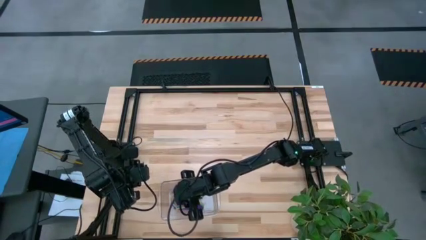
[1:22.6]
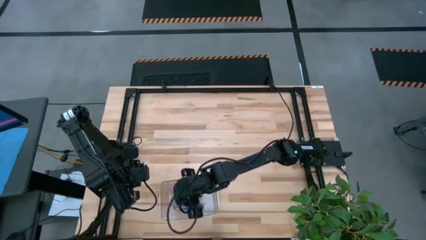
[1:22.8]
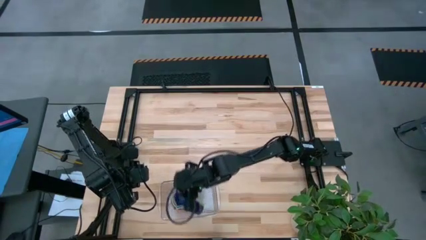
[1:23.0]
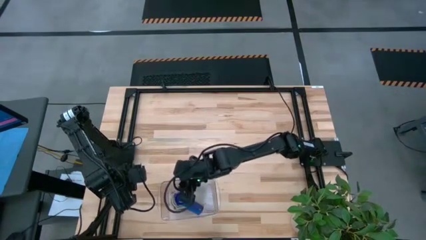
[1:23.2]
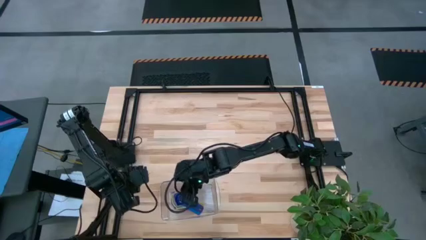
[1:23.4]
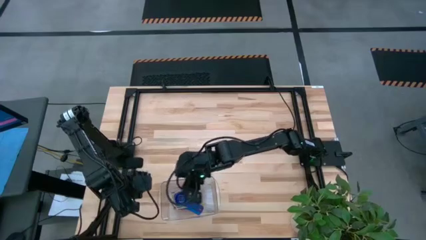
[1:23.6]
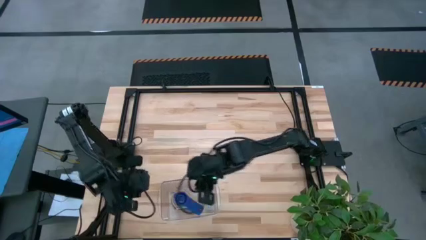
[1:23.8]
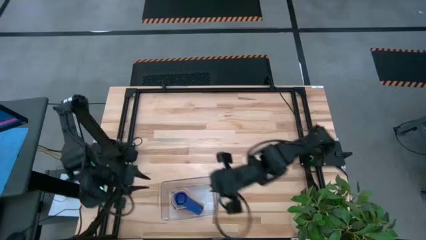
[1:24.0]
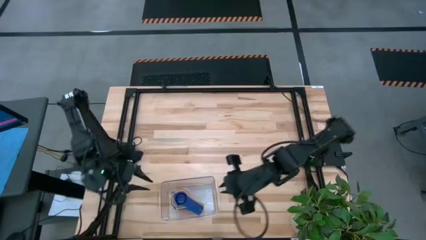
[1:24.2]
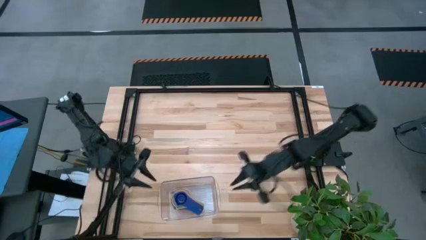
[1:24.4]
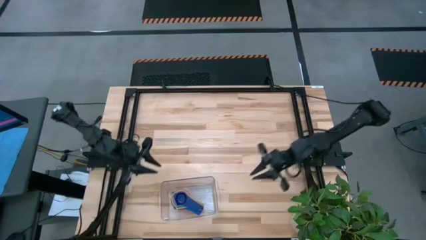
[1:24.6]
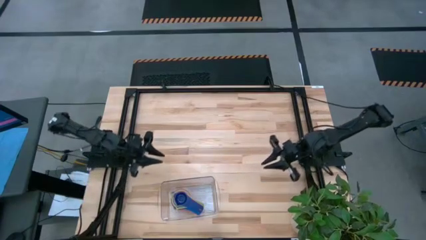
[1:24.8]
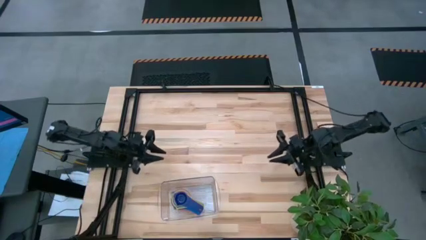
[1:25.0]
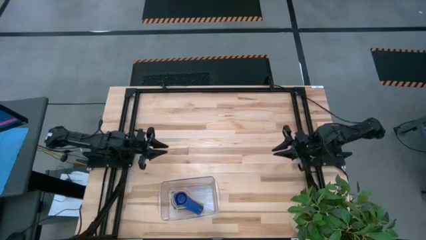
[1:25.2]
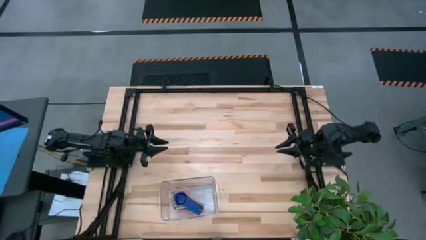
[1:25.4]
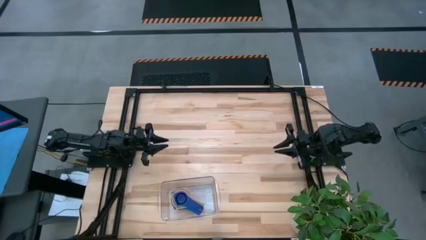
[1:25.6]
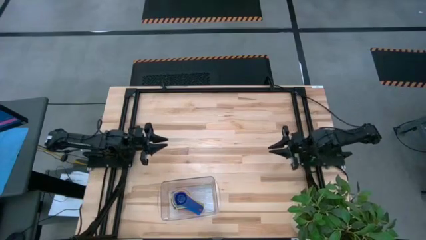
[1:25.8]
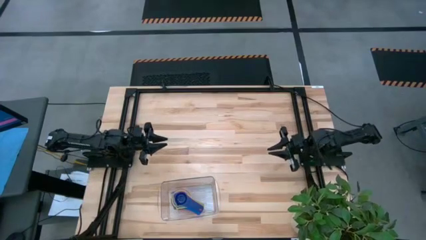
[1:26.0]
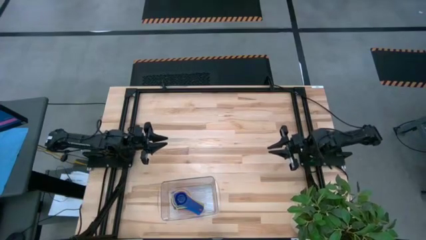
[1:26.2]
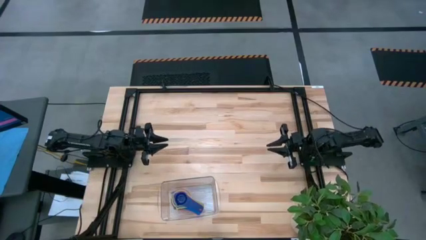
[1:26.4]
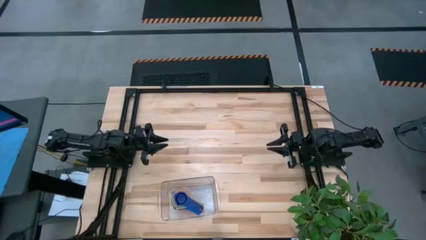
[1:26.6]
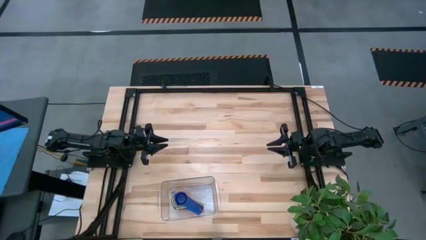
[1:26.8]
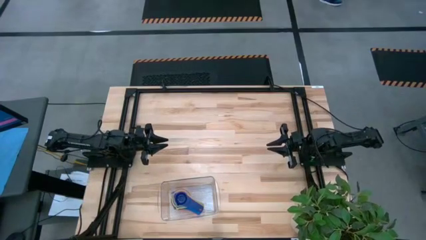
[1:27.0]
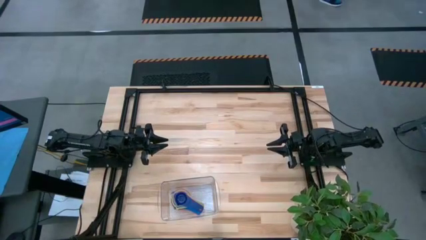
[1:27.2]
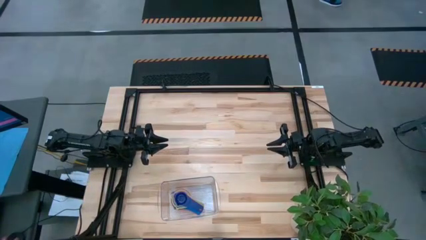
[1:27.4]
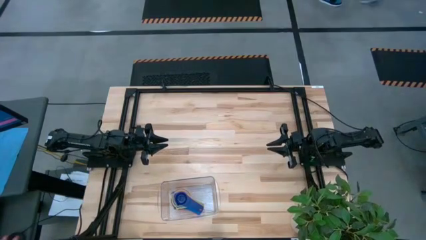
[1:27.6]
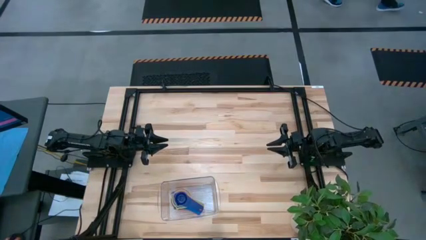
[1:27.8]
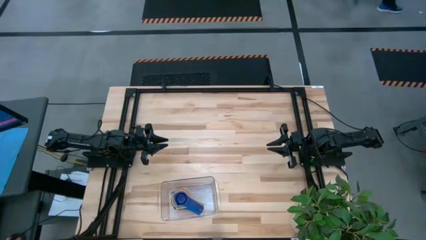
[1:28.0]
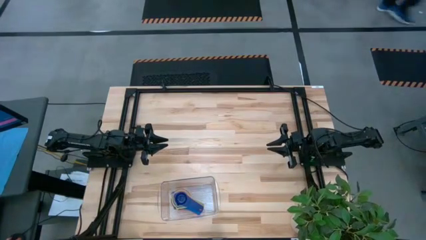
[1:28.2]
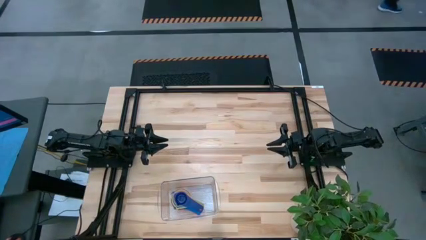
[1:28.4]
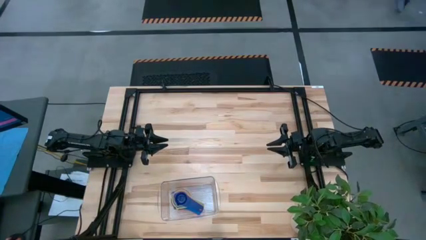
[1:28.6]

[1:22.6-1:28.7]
Task: Nest measuring cups in basket
Return to Home Position
